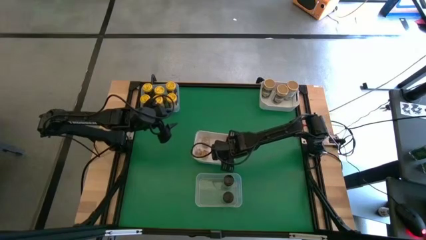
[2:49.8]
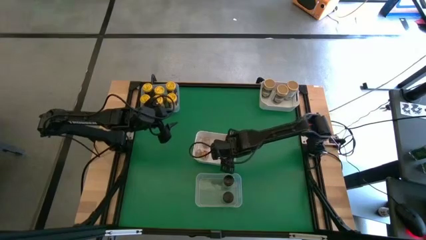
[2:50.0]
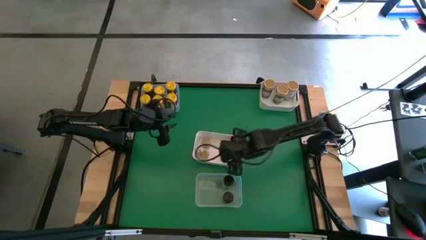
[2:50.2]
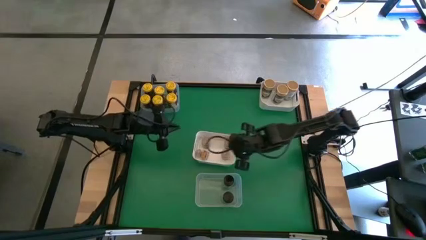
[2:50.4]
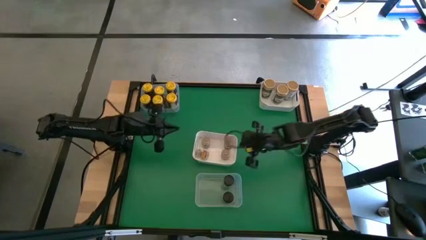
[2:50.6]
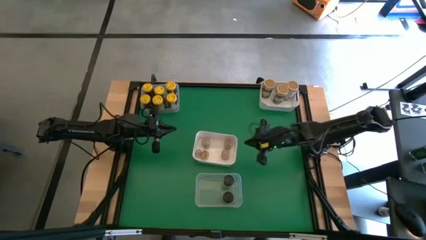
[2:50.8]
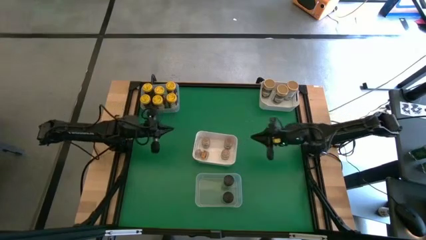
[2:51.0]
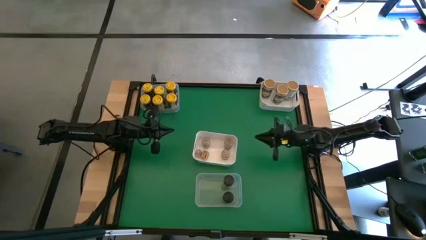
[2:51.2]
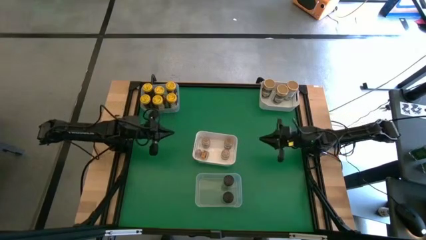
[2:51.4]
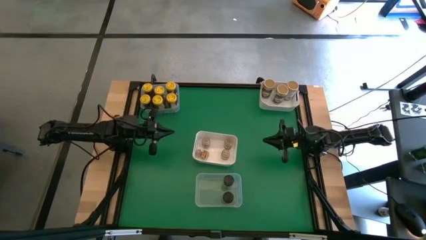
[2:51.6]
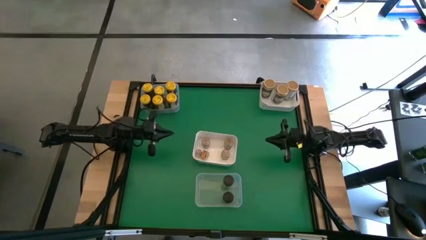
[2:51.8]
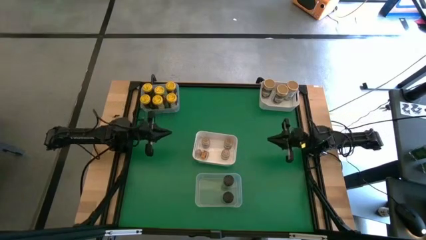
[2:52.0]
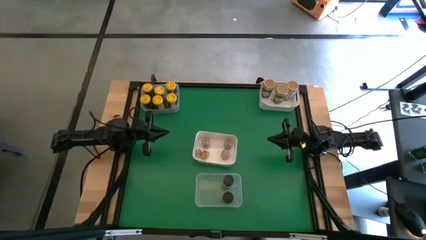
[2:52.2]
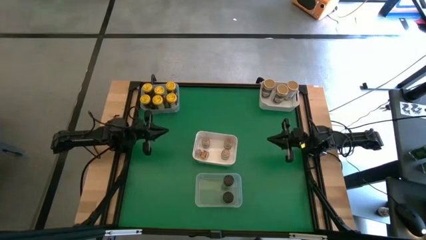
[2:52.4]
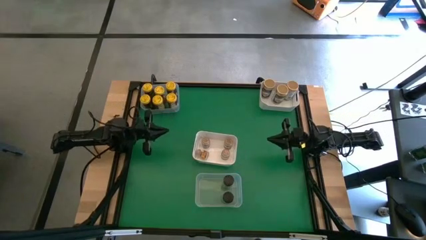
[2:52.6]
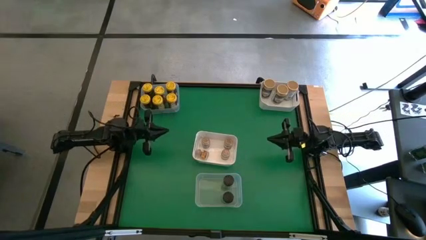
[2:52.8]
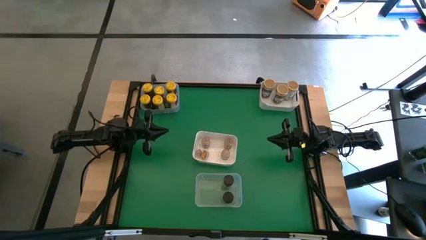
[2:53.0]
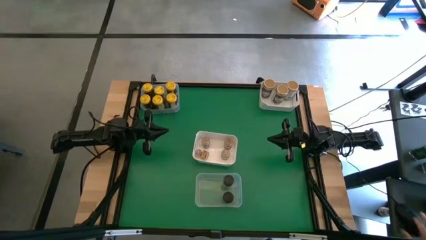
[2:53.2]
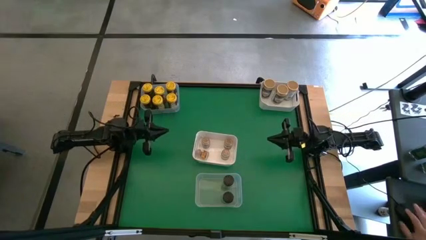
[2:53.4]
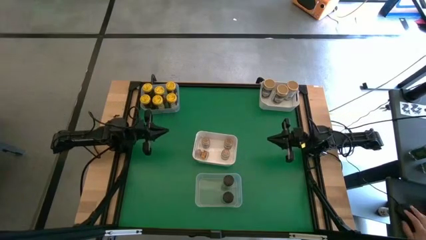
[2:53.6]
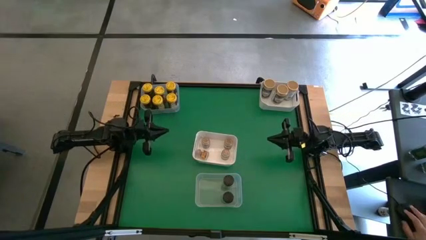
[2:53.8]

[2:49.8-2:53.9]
Task: Sort spices by type
Return to Home Position

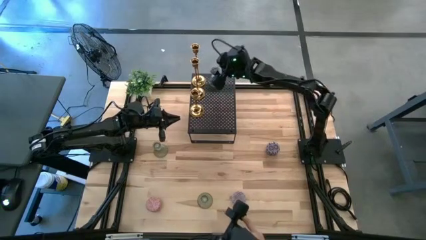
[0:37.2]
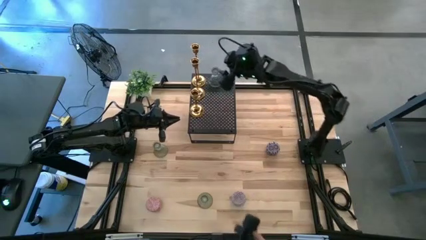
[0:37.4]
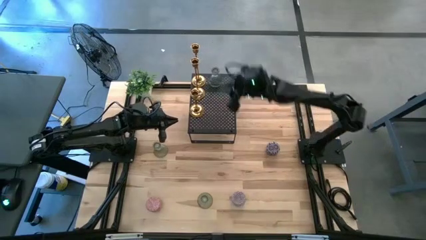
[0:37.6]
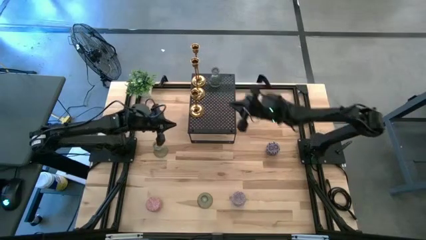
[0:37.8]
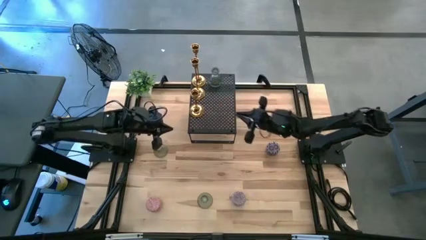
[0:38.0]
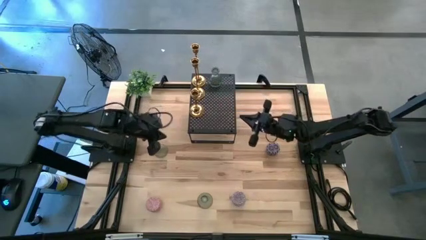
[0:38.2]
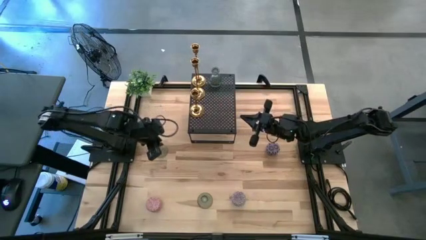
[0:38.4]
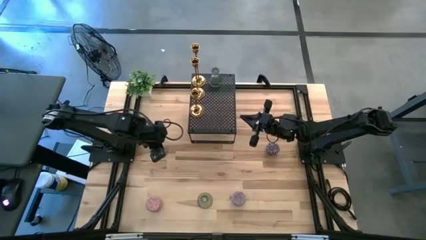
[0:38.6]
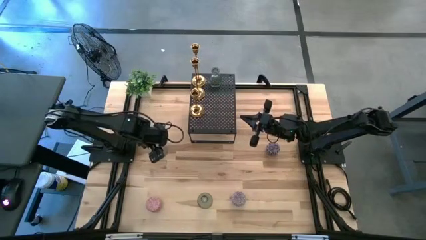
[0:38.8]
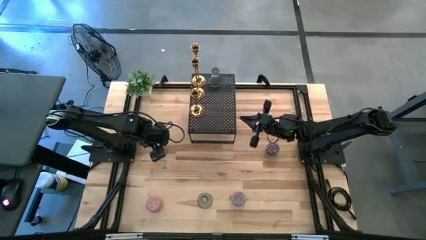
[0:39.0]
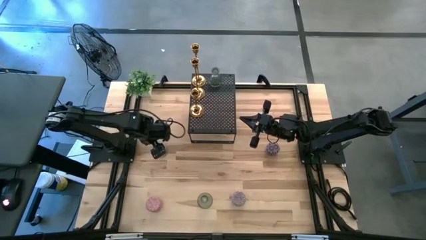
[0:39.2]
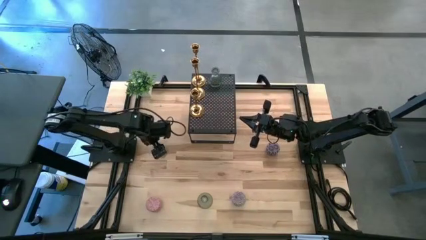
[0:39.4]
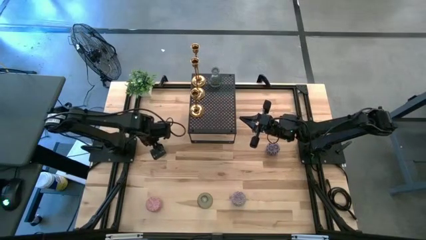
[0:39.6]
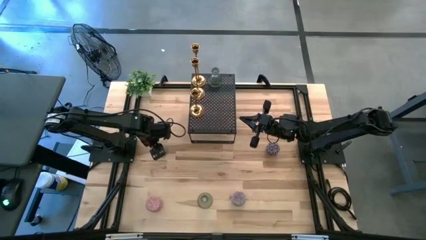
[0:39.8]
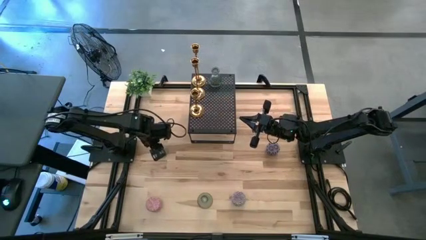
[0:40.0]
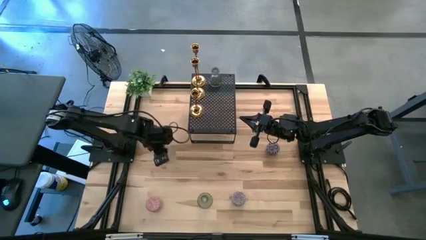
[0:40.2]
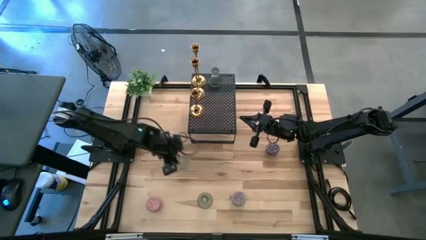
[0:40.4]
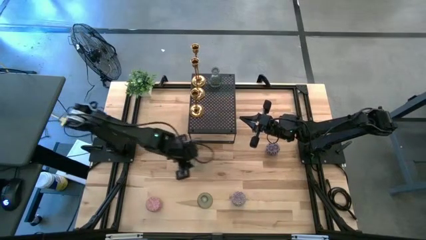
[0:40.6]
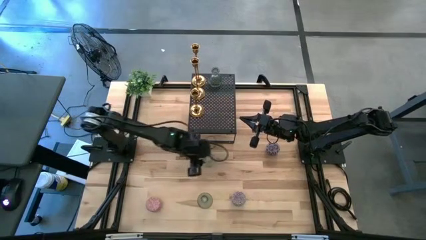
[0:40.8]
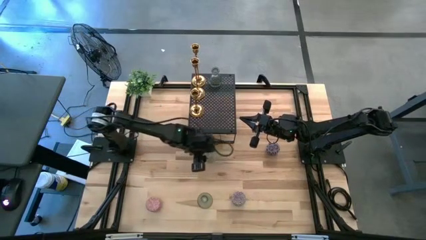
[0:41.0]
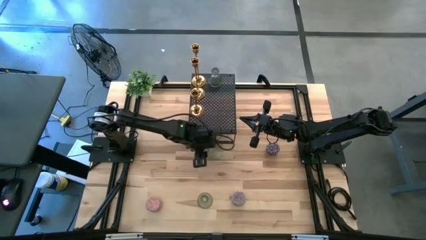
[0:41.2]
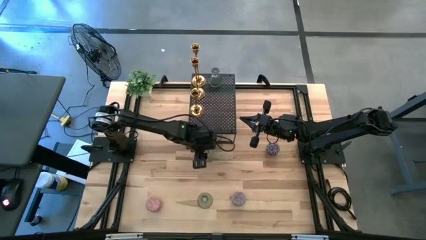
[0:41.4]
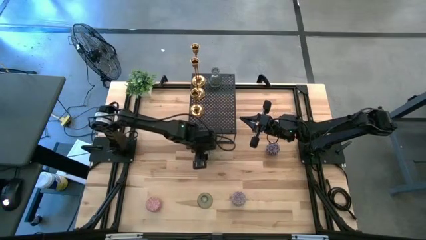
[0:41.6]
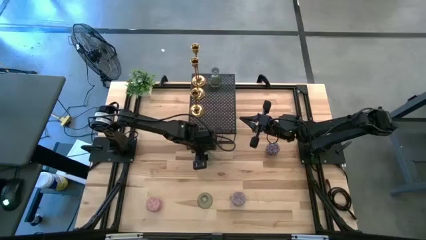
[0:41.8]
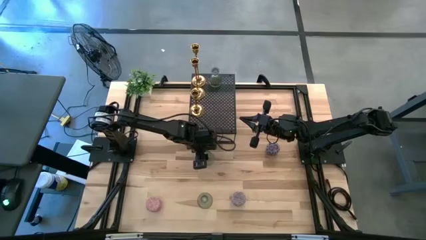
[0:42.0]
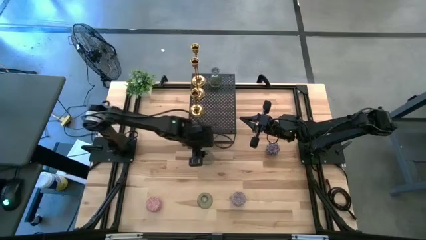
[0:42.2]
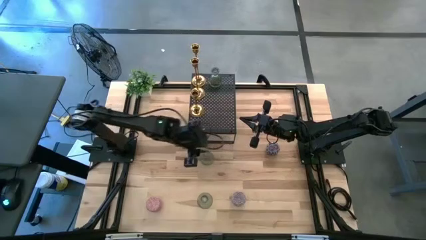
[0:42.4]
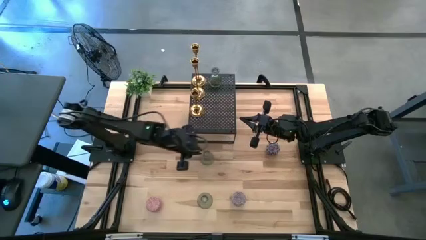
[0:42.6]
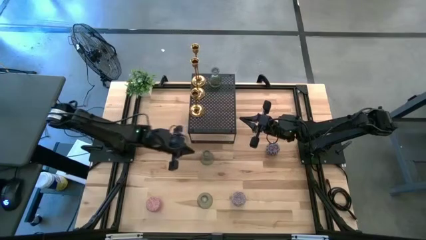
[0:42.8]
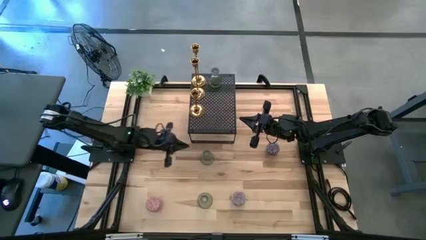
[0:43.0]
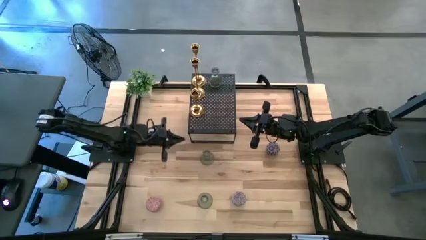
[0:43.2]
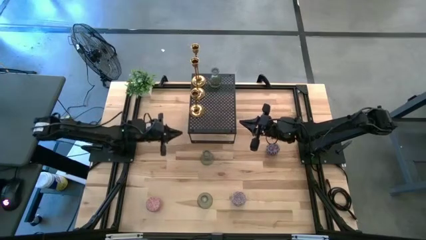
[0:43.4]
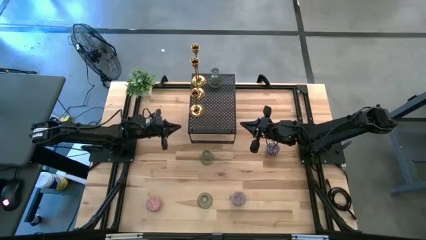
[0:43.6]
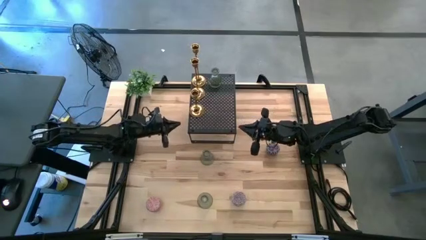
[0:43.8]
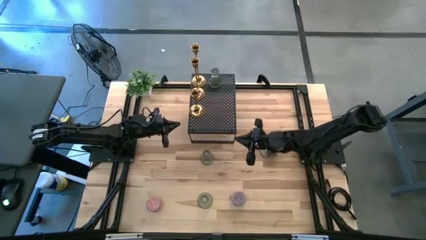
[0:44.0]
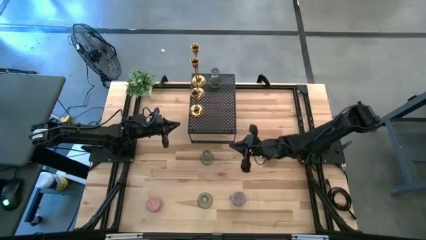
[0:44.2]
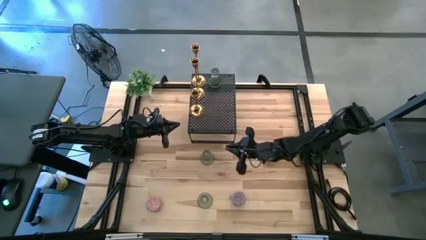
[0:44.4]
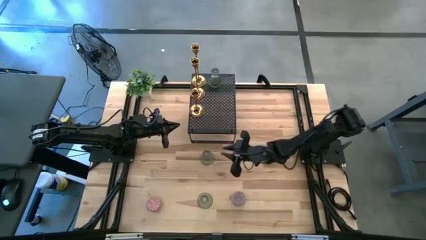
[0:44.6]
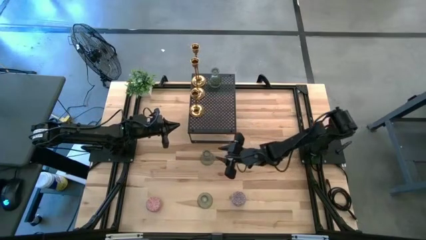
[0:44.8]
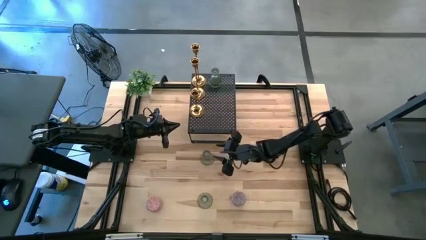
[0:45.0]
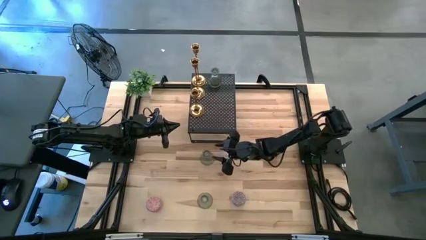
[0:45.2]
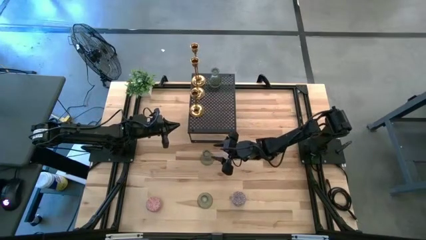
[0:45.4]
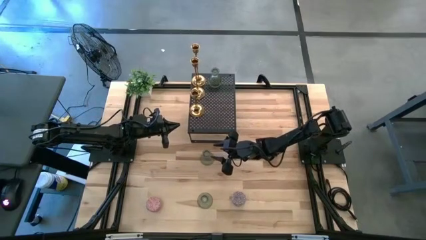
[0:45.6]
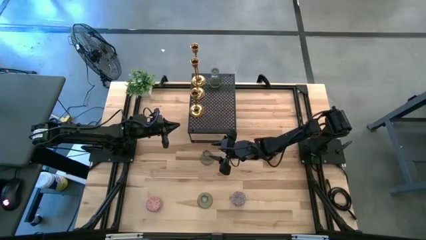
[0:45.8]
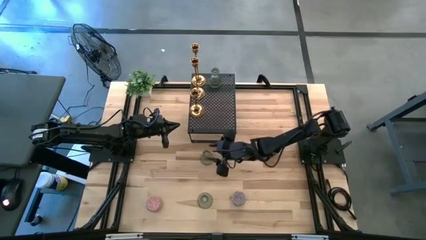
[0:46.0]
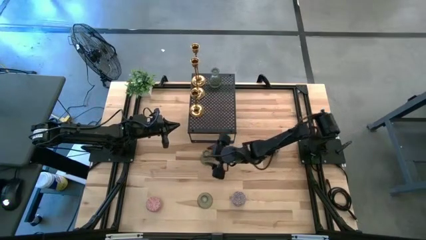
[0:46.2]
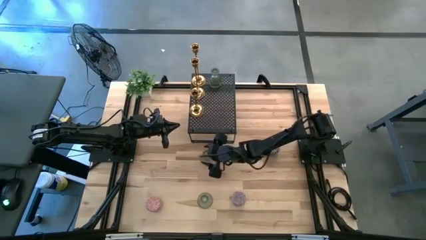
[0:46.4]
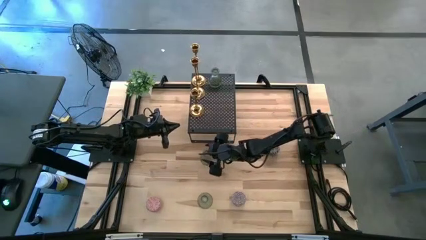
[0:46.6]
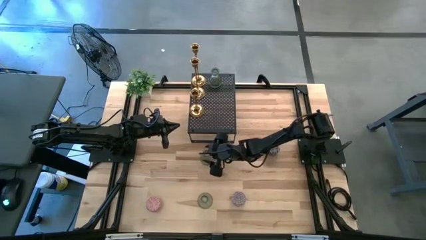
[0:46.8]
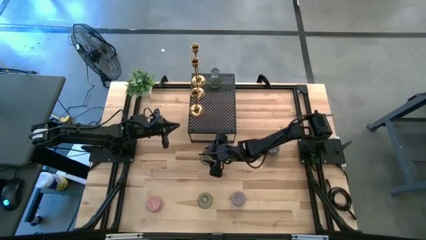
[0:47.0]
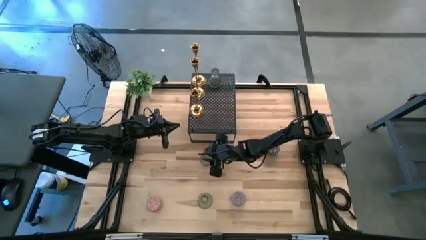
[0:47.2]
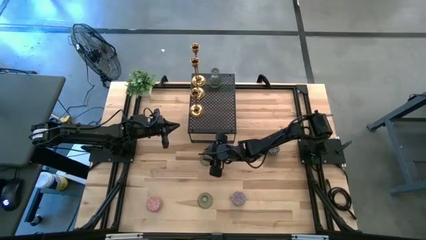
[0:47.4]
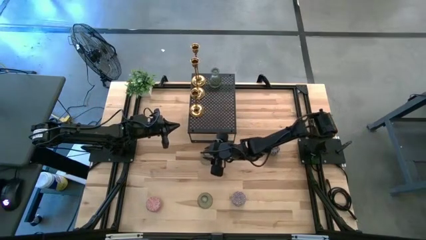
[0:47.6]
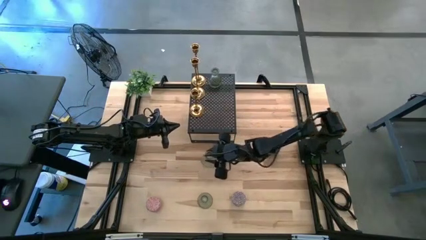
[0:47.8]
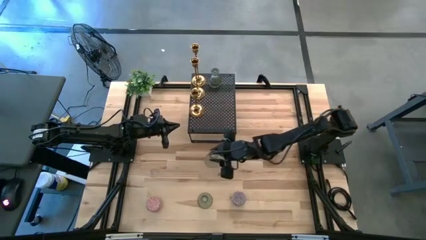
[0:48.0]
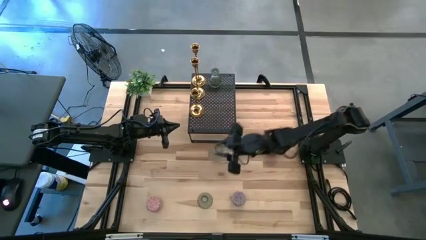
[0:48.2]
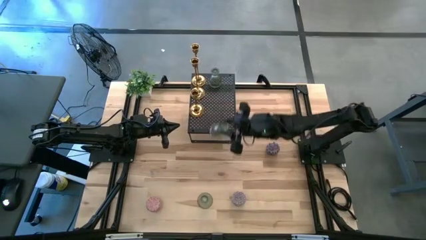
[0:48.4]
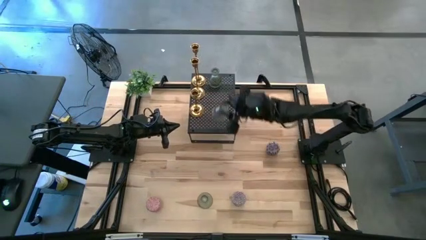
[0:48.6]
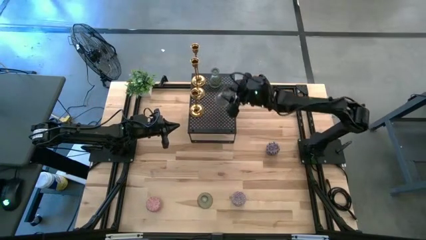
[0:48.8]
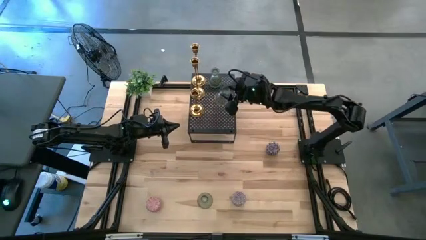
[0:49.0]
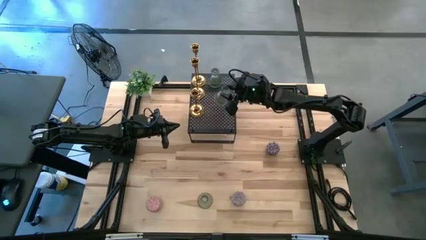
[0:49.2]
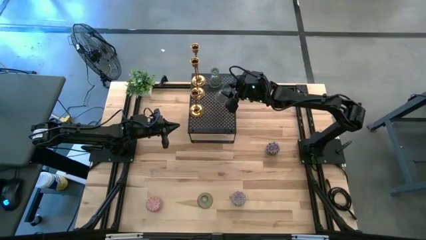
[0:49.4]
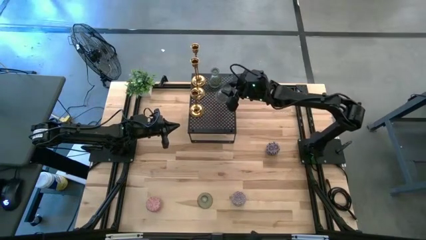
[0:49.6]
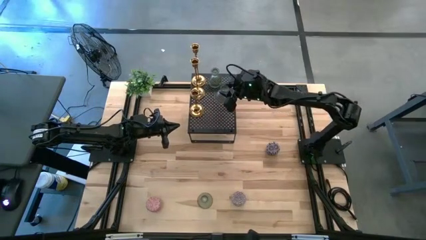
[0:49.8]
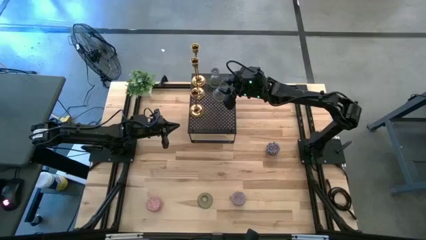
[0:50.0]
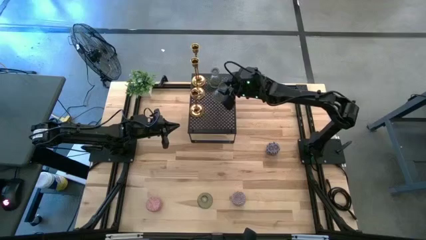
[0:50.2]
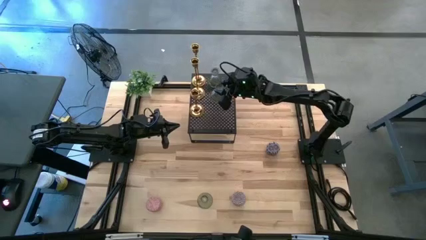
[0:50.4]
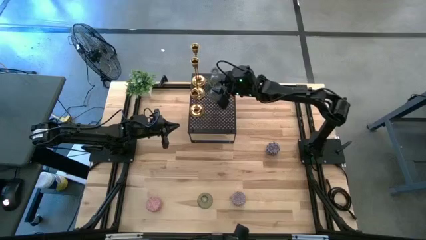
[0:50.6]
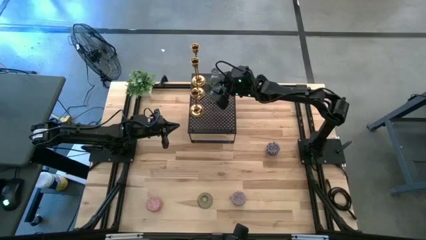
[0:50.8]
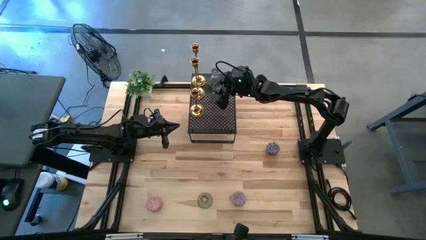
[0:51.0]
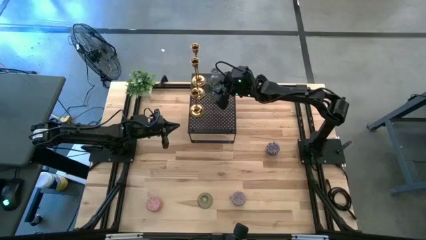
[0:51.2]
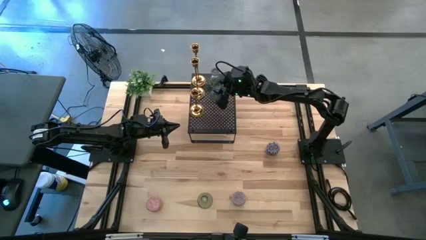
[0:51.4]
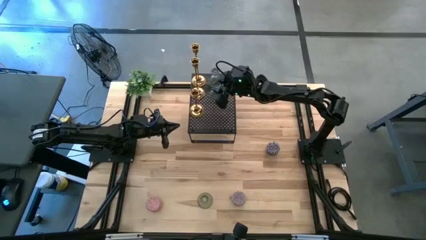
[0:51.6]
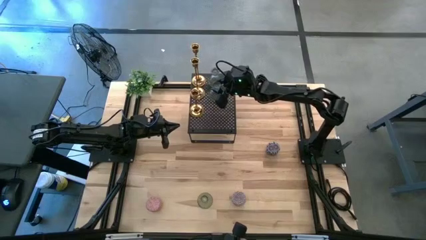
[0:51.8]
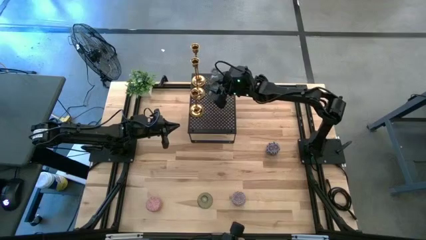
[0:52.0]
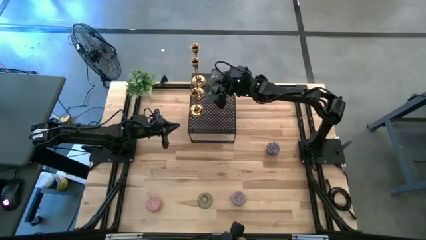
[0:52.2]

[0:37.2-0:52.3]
Task: Pick & Place candle stick holders
Put the left transparent candle holder on the shelf aligned with the other transparent candle holder
